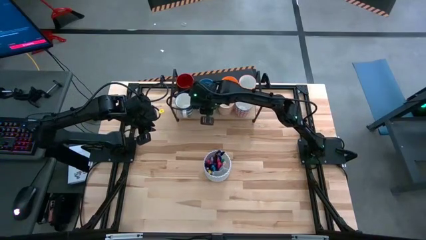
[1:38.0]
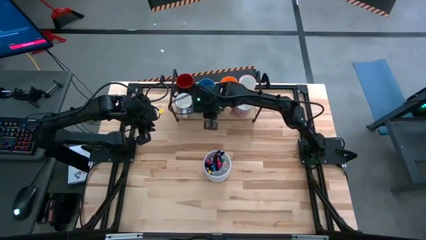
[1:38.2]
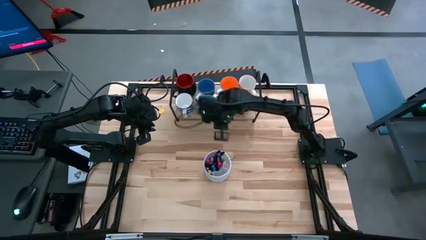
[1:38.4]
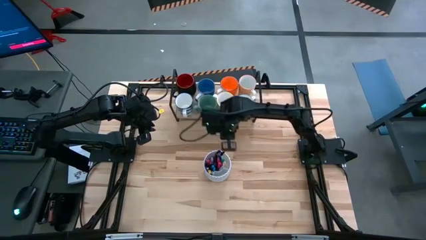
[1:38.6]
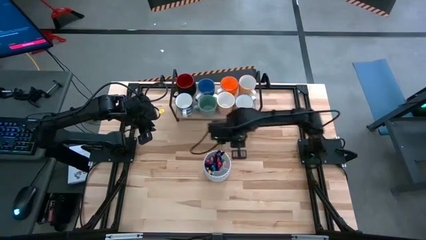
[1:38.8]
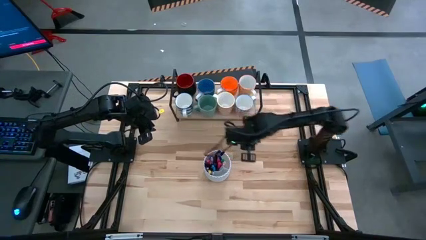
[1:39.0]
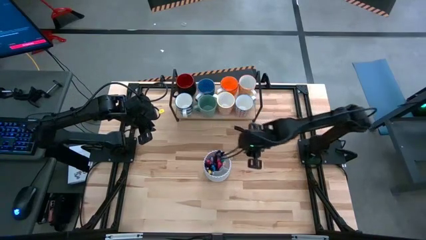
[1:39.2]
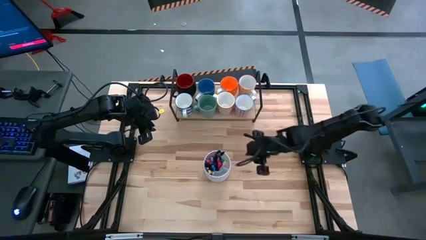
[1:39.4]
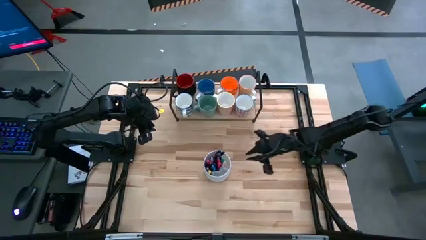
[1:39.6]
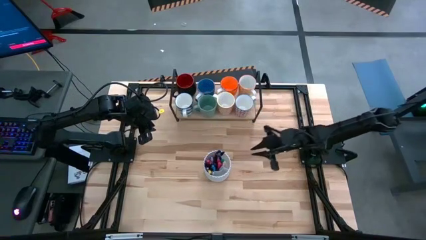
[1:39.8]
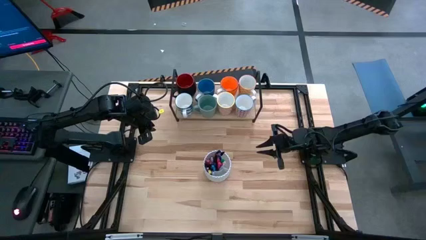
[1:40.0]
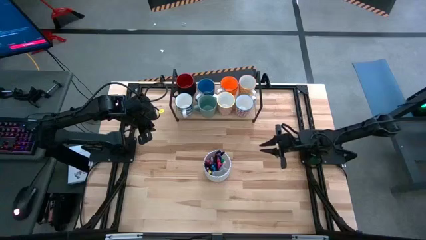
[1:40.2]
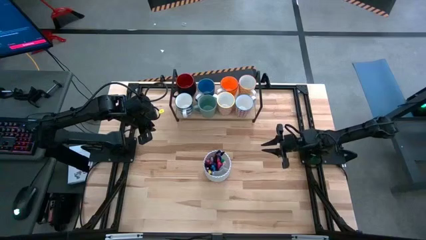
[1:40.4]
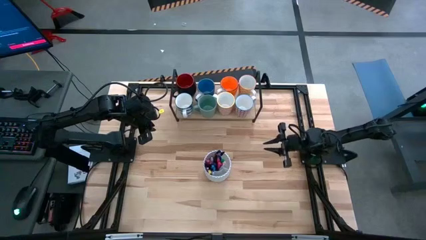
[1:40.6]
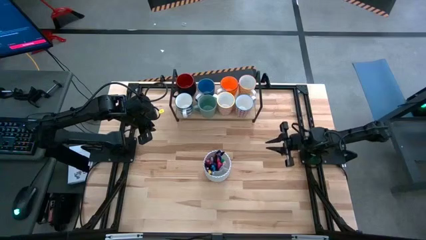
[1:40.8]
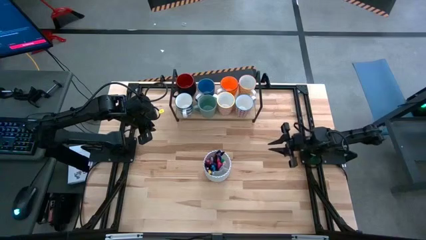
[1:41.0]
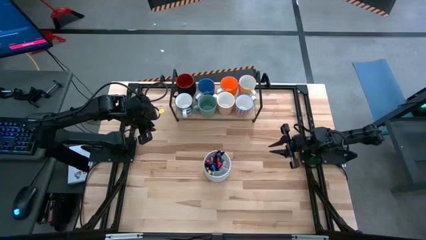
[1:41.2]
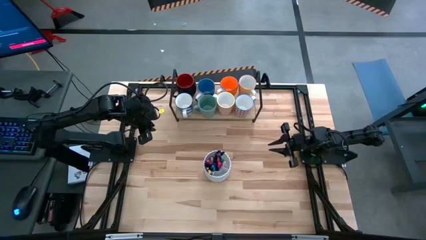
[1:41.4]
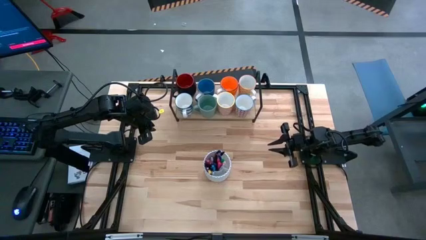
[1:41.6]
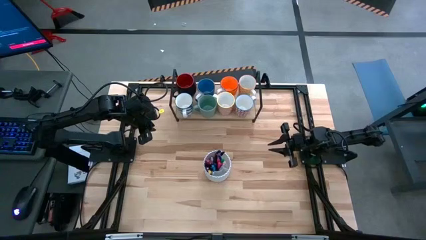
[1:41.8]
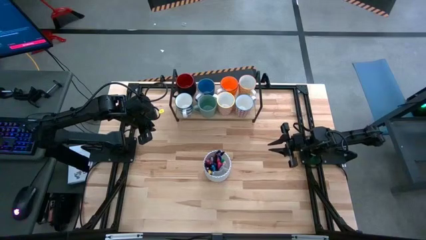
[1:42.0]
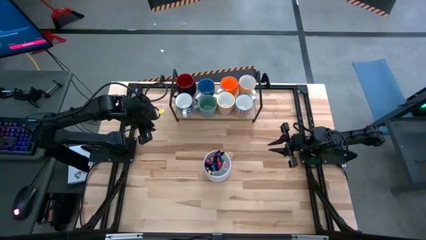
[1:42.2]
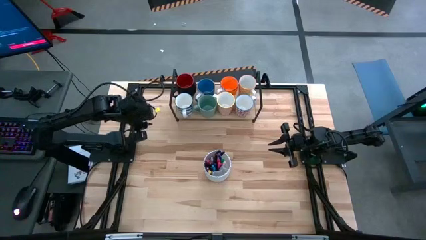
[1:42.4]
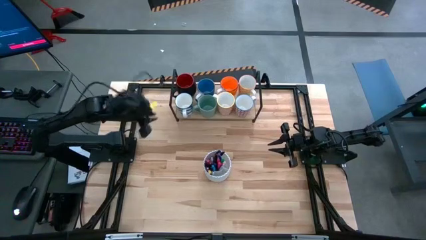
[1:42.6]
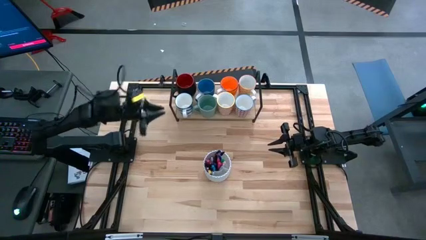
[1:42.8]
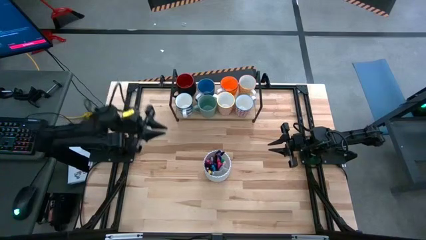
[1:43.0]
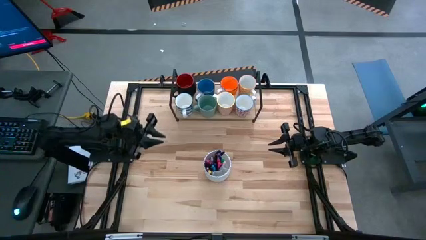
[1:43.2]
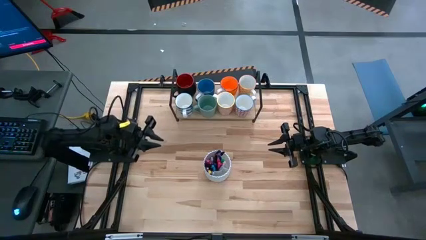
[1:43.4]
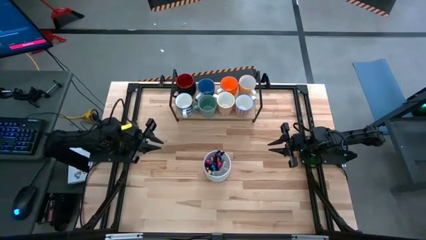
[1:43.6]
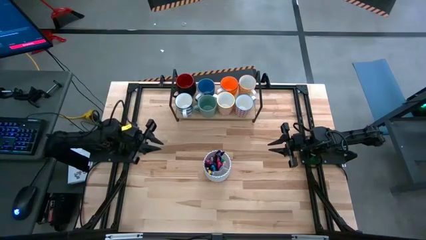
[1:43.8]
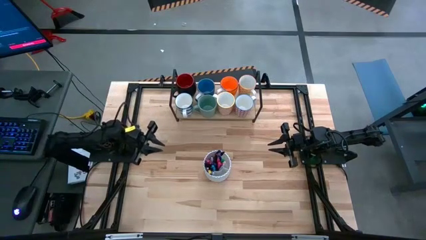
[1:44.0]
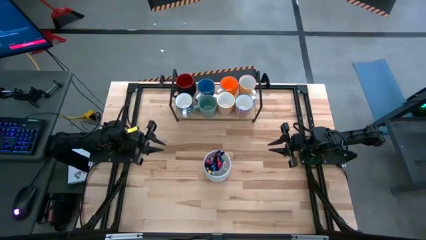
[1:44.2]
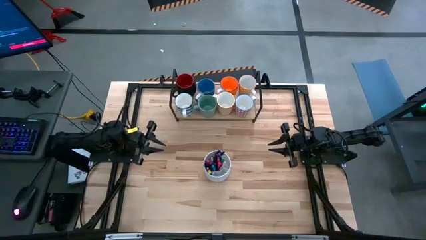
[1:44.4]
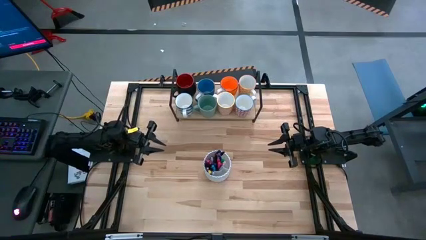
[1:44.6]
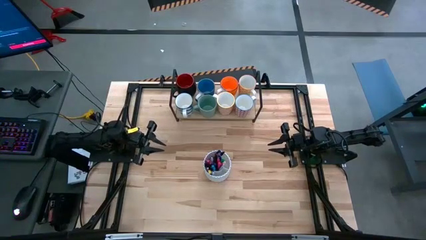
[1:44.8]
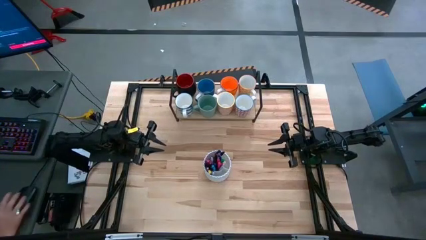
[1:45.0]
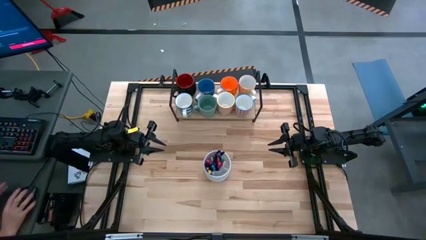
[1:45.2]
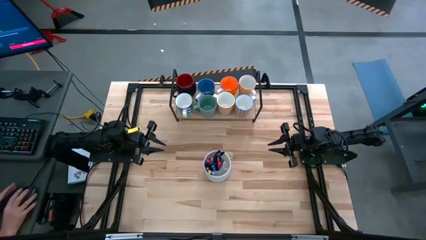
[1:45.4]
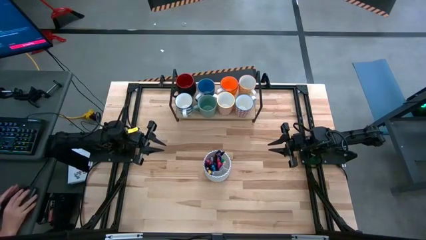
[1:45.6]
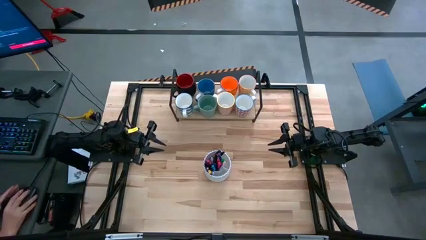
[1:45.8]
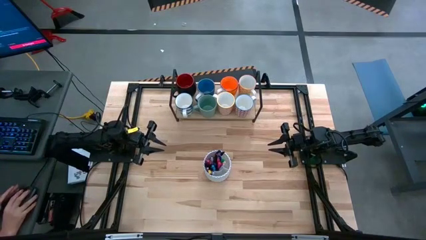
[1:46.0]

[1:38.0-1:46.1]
Task: Place coffee mugs
Return to home position
